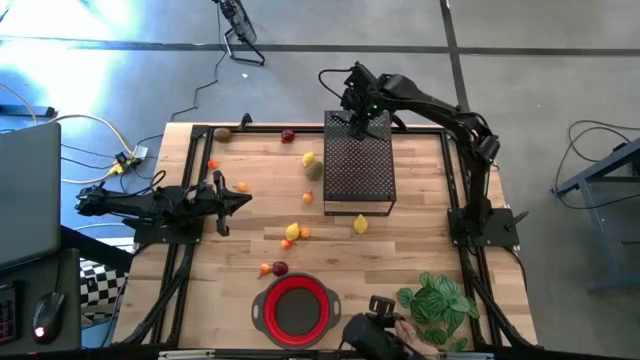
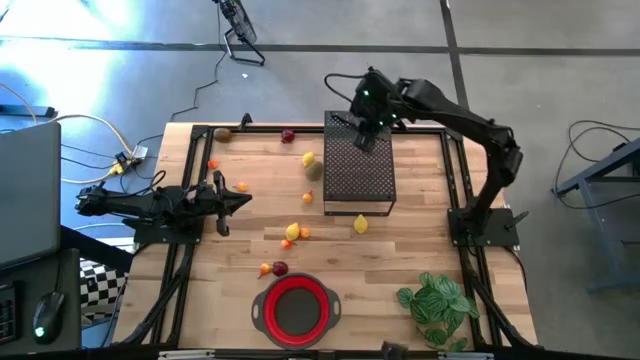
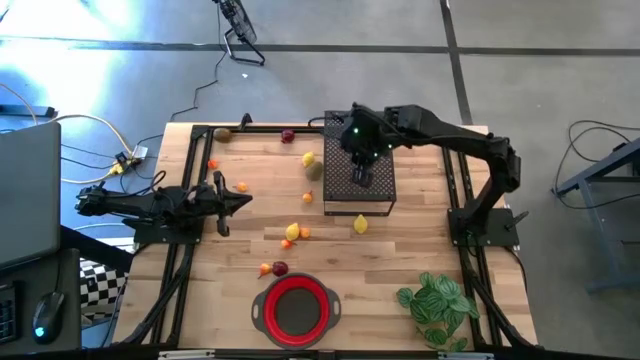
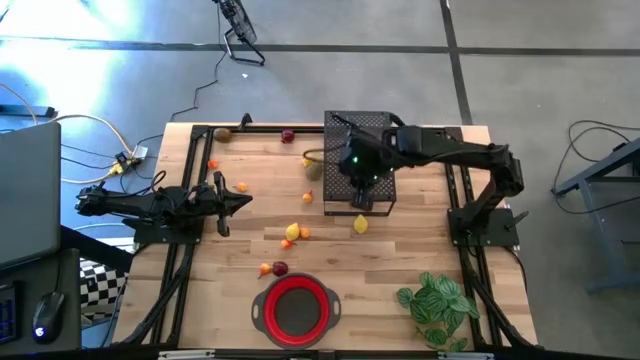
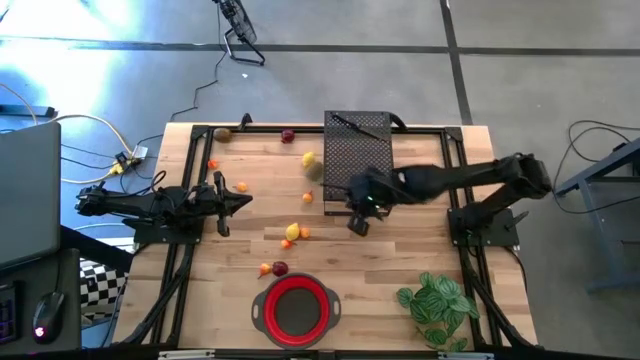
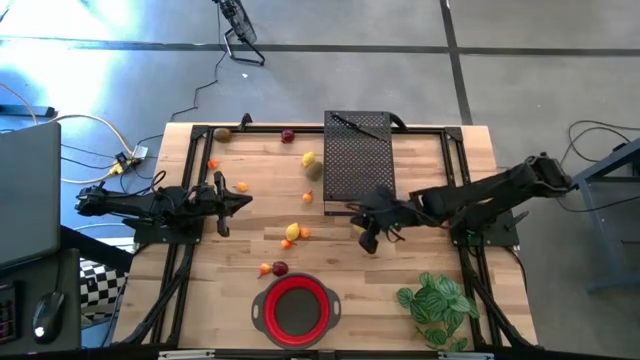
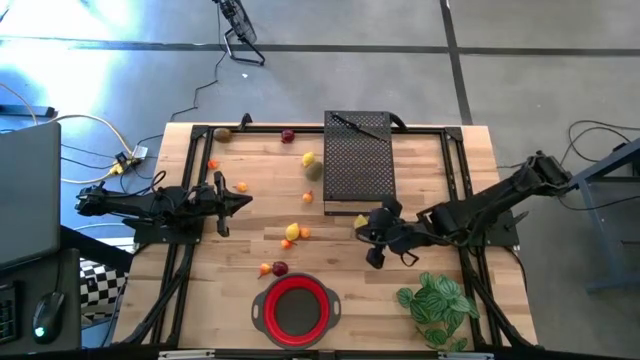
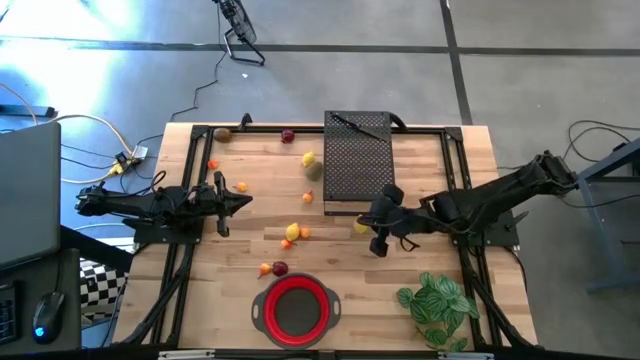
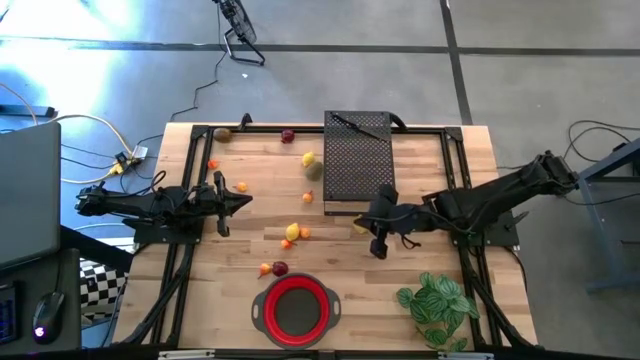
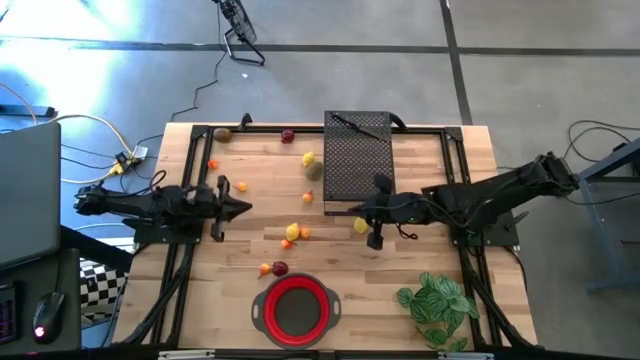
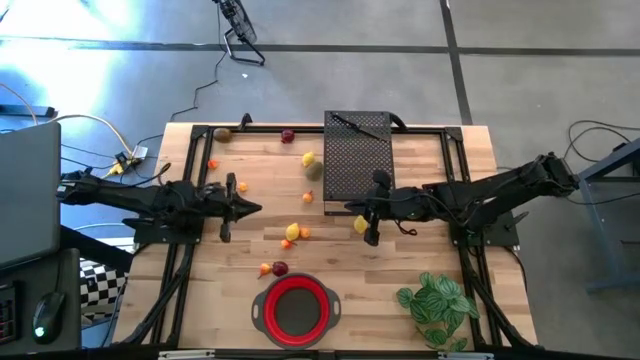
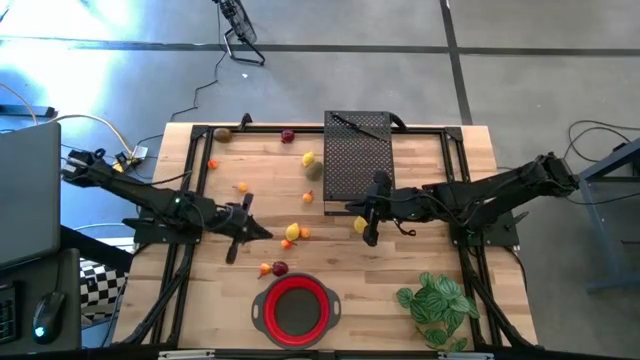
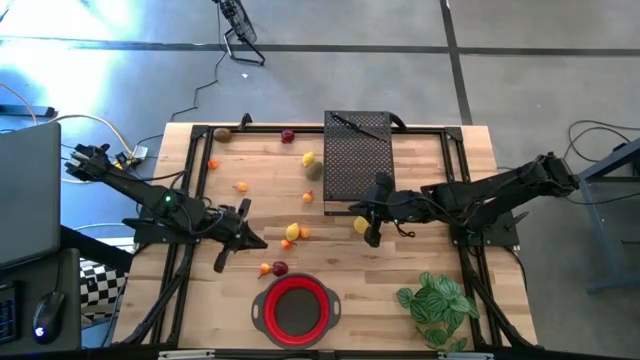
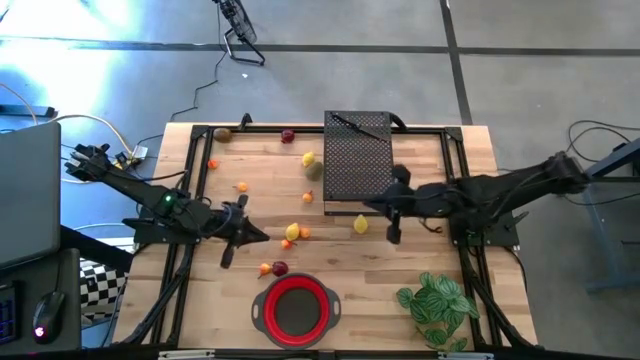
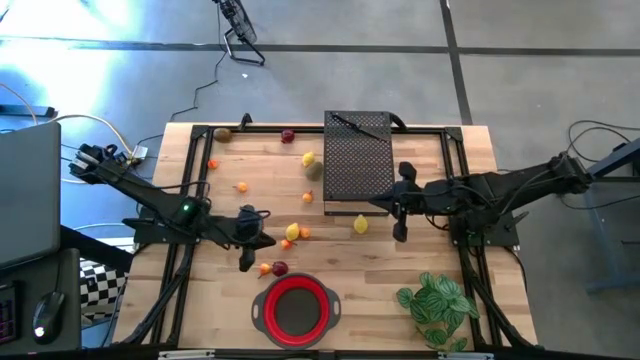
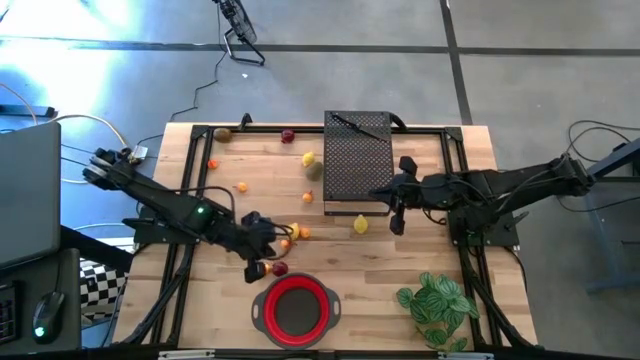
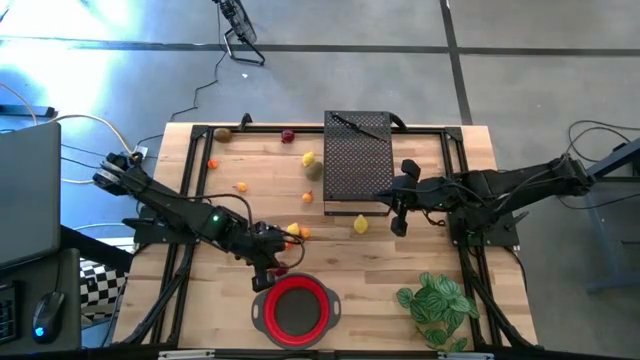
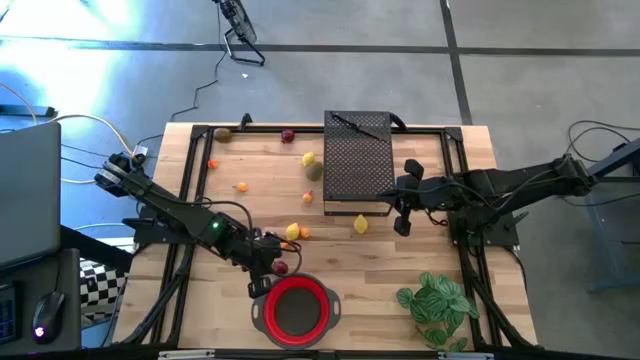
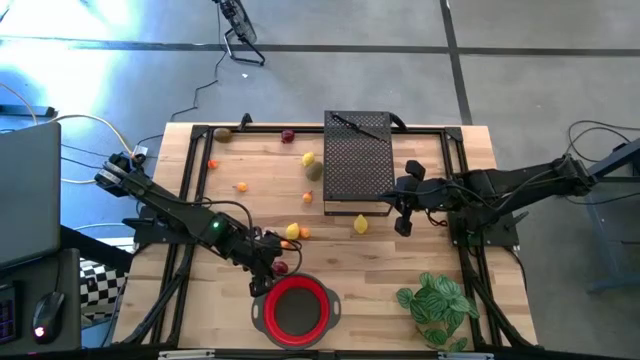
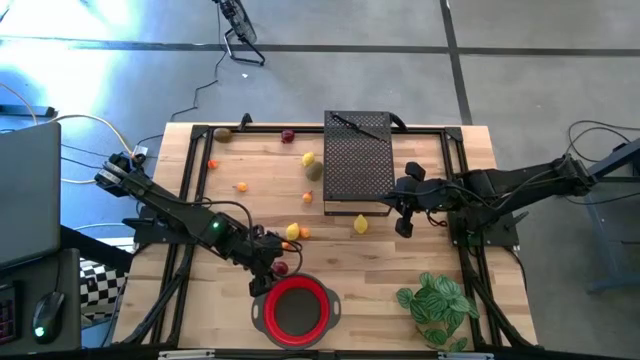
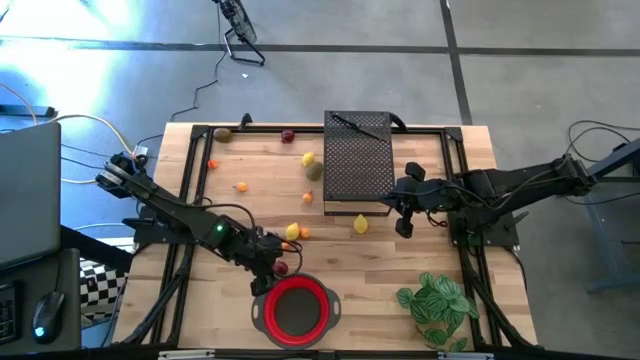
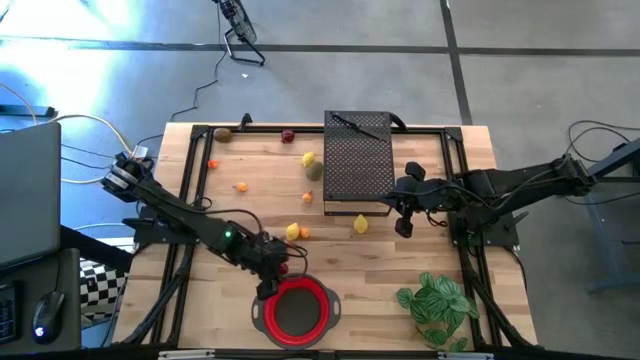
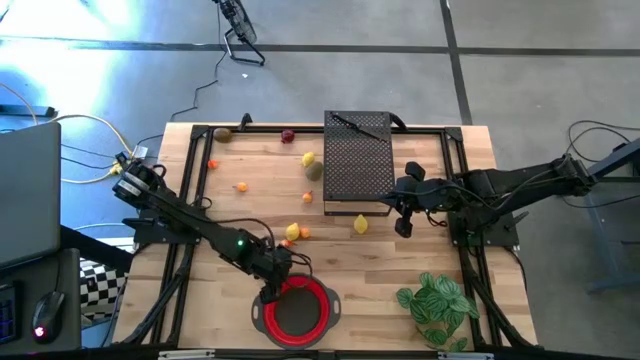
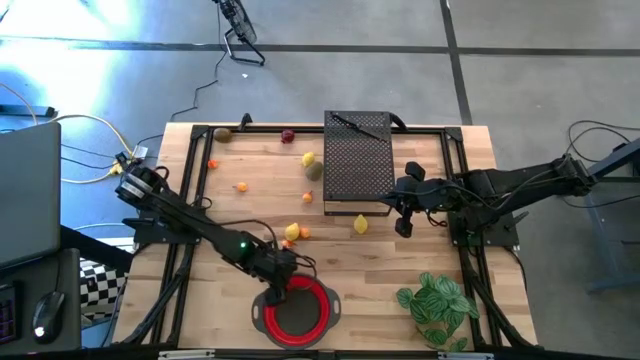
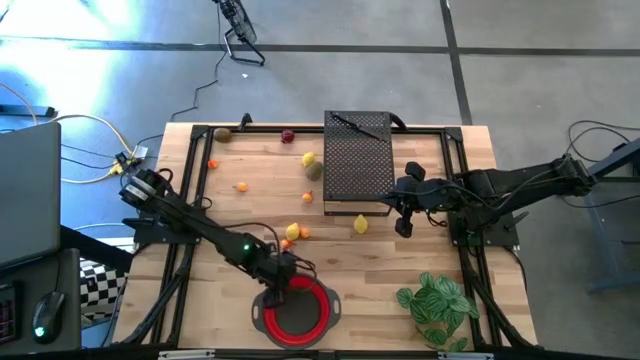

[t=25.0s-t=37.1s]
Task: Pick & Place Fruit
Put the red strainer bowl on the shelf

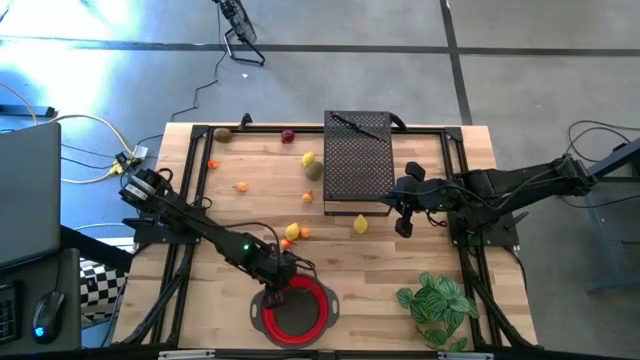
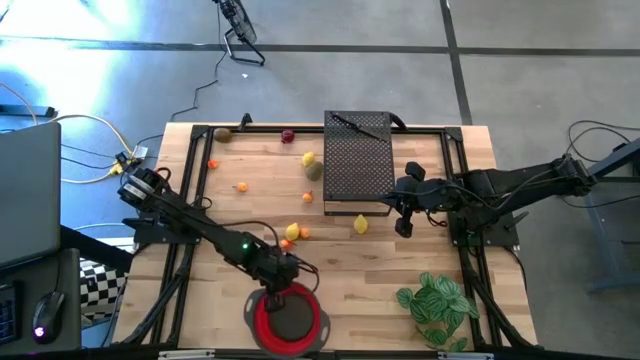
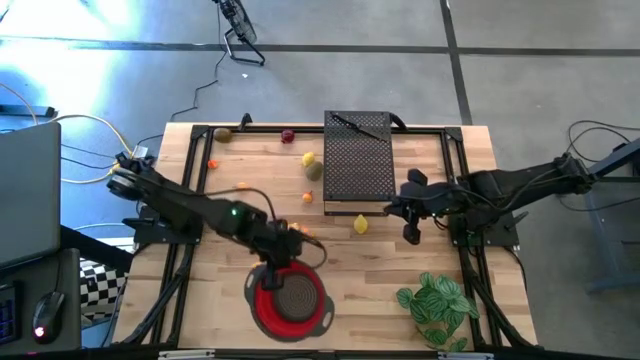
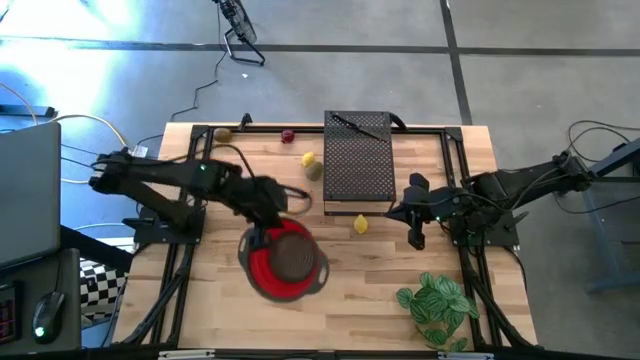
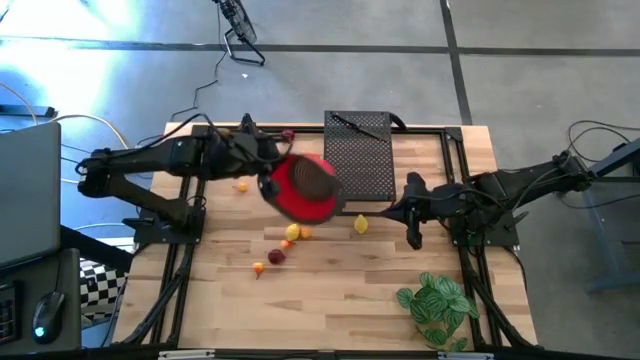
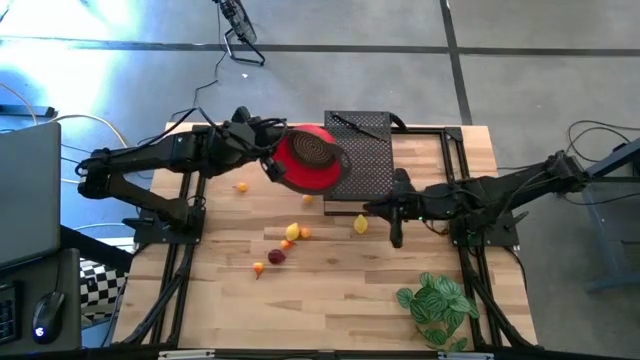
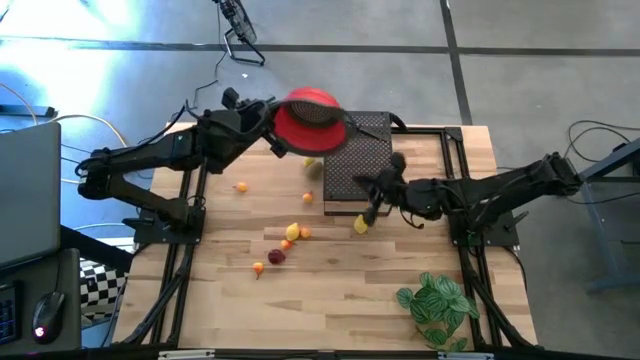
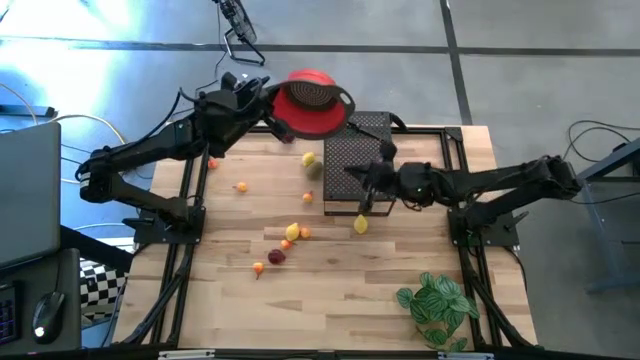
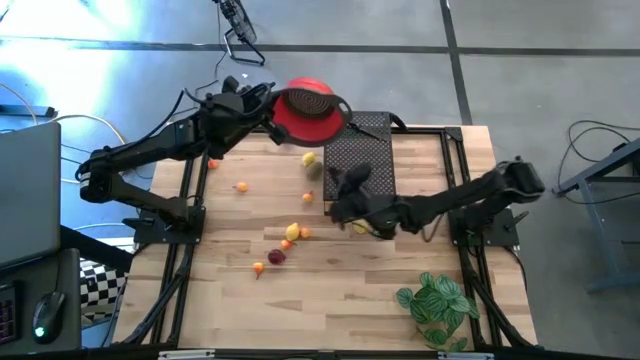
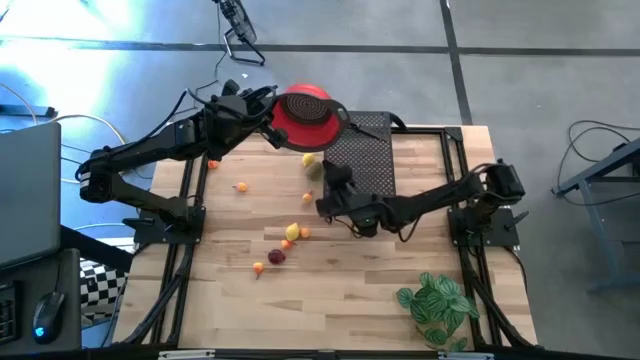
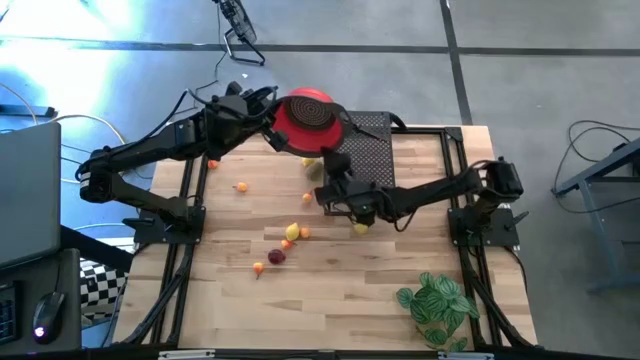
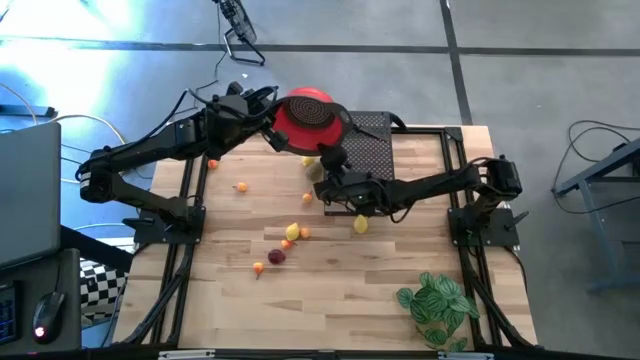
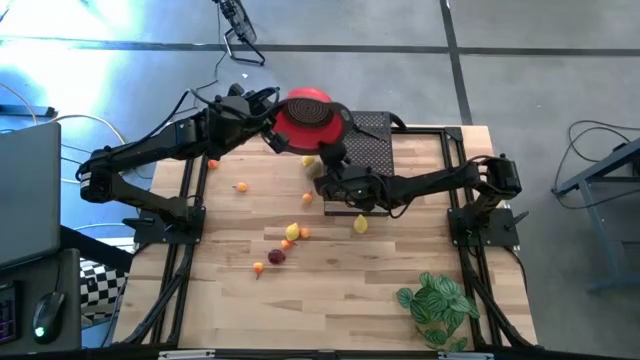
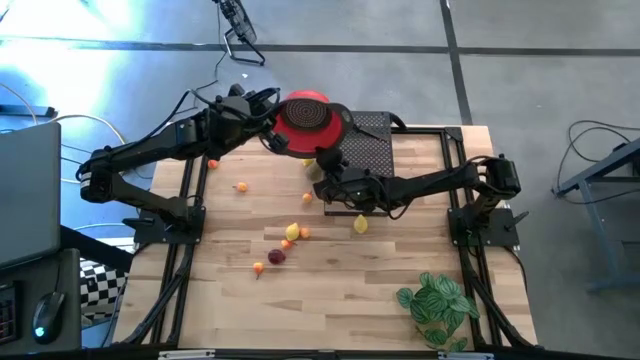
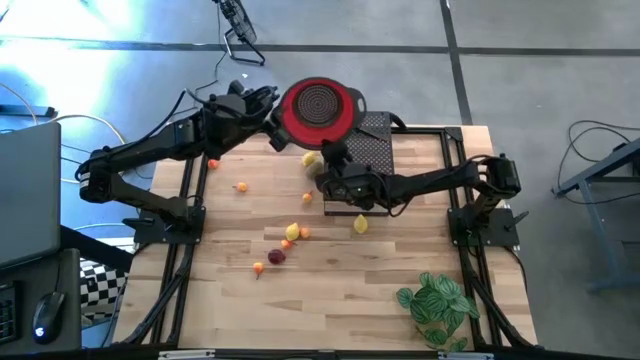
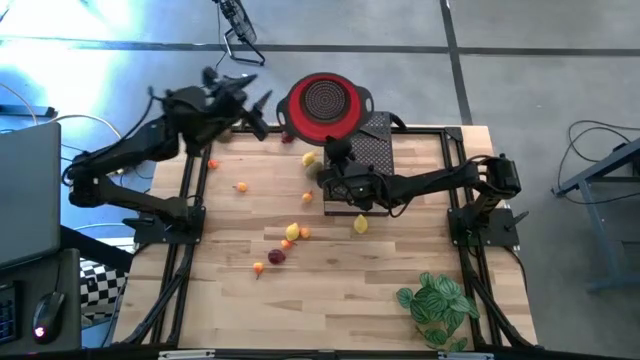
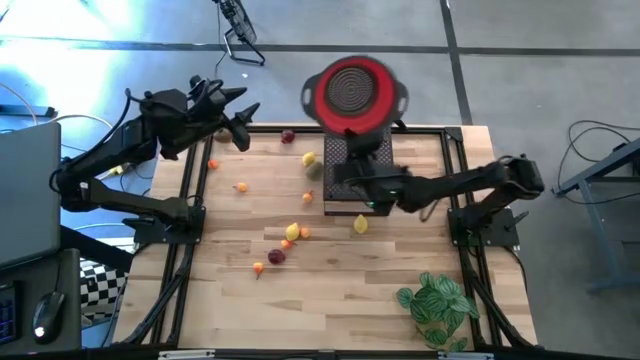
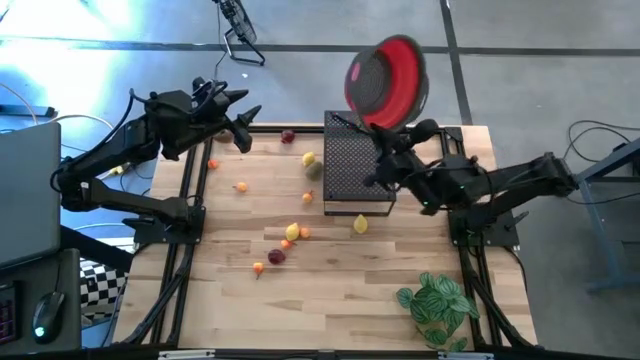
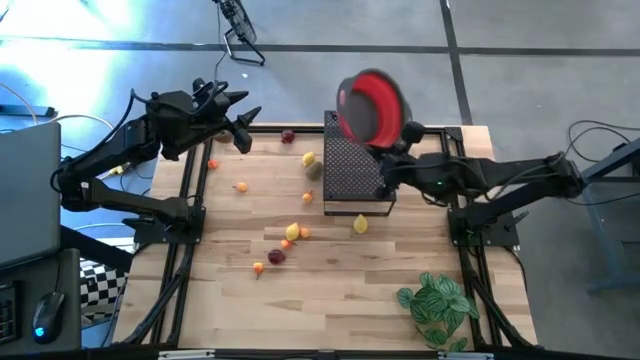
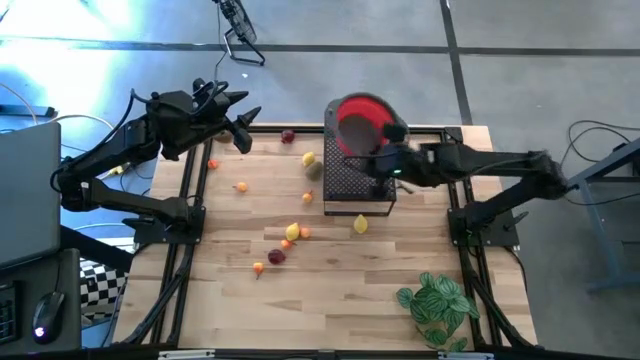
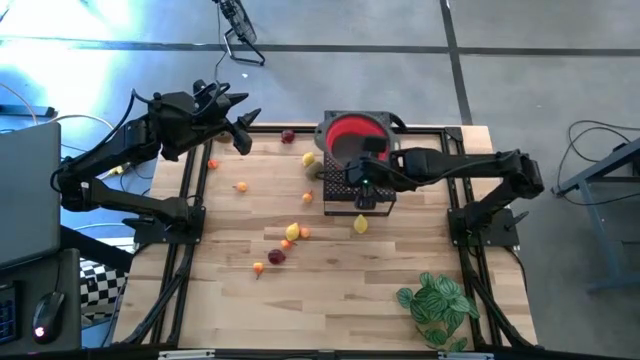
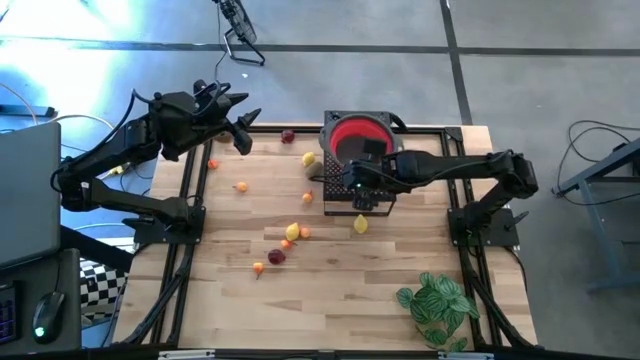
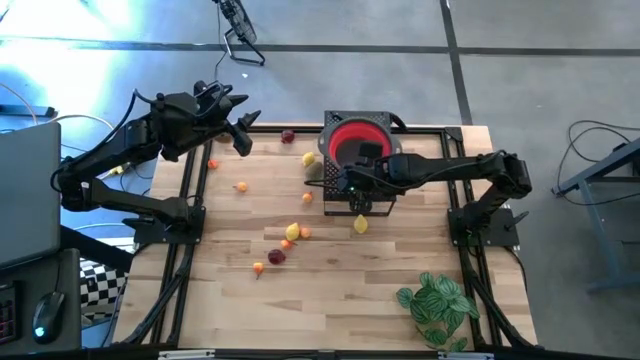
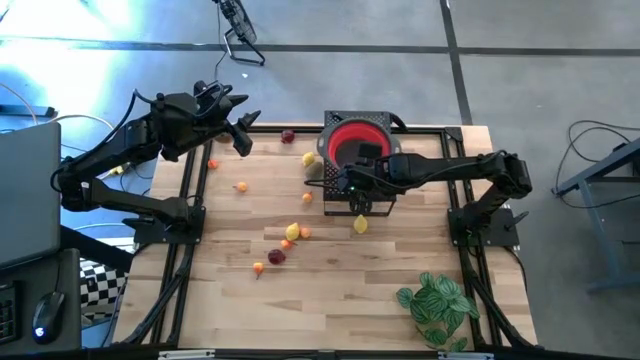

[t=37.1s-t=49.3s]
Put the red strainer bowl on the shelf
